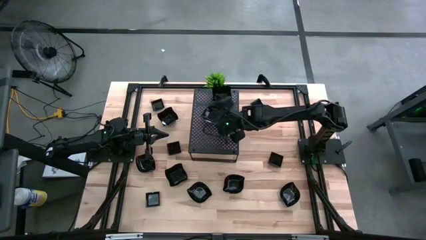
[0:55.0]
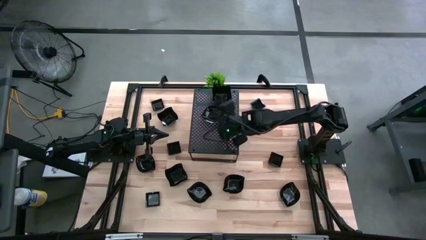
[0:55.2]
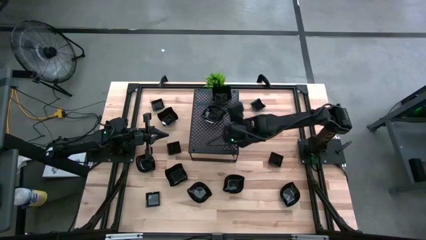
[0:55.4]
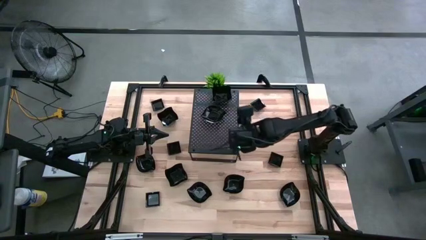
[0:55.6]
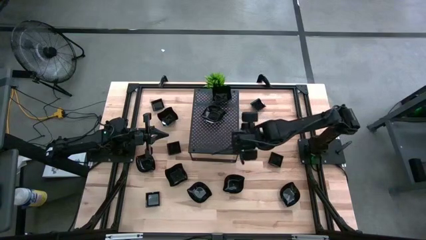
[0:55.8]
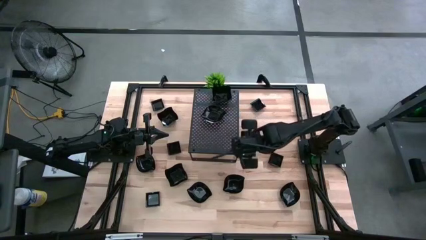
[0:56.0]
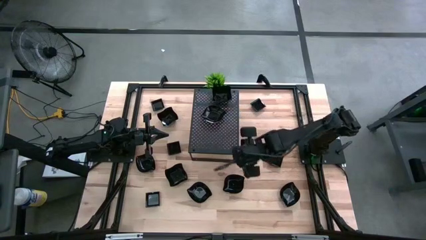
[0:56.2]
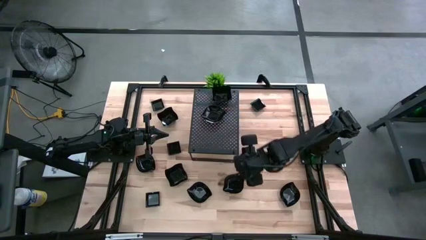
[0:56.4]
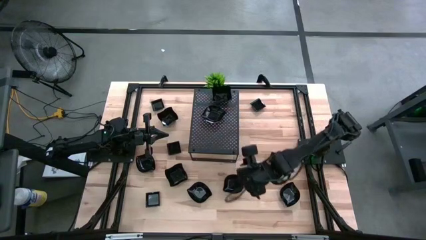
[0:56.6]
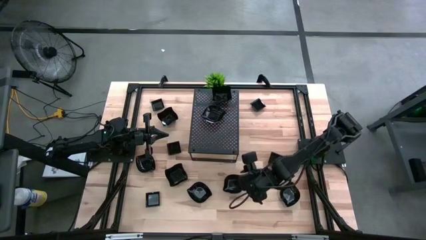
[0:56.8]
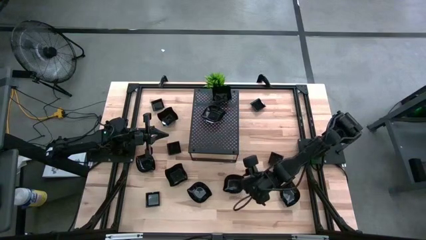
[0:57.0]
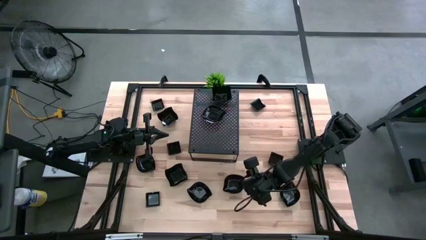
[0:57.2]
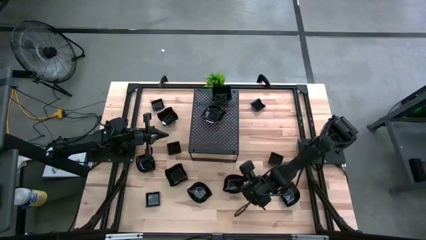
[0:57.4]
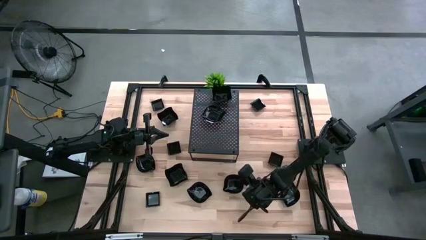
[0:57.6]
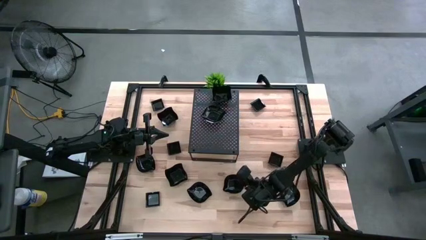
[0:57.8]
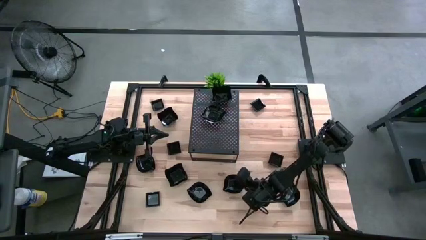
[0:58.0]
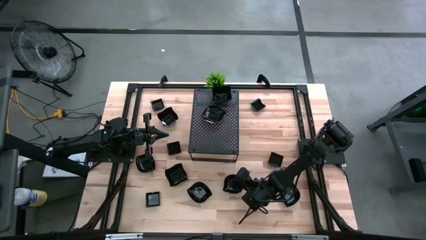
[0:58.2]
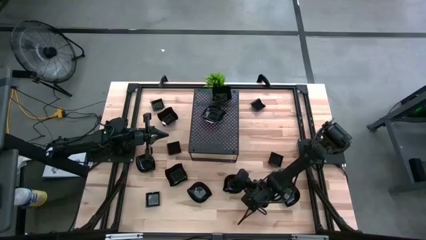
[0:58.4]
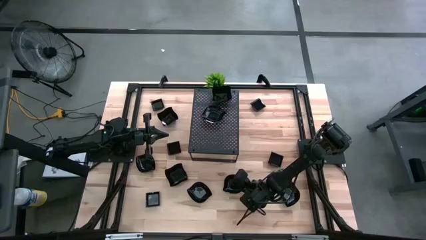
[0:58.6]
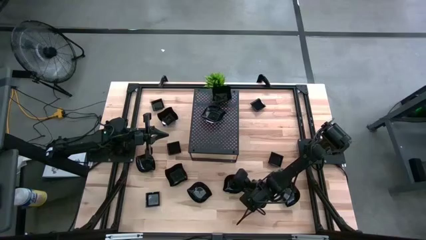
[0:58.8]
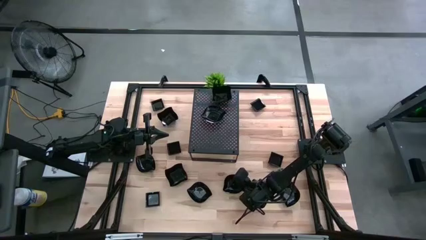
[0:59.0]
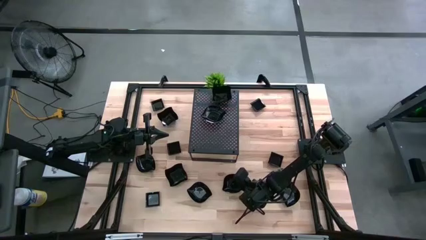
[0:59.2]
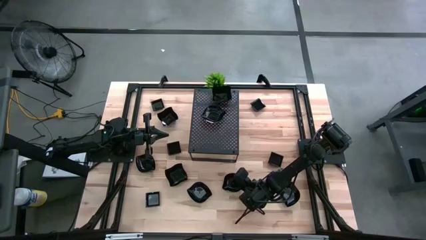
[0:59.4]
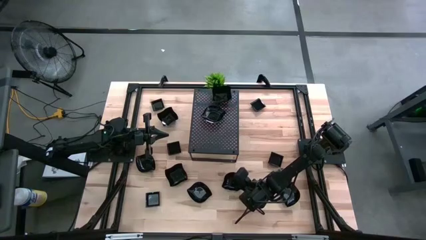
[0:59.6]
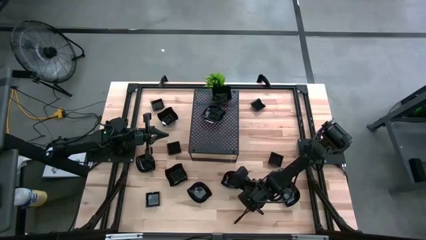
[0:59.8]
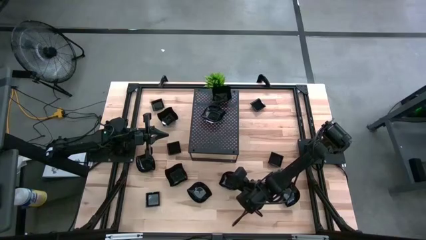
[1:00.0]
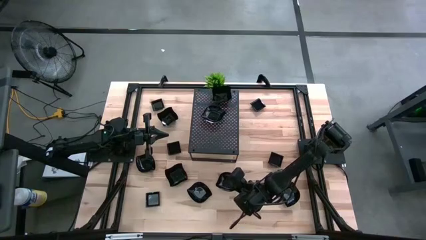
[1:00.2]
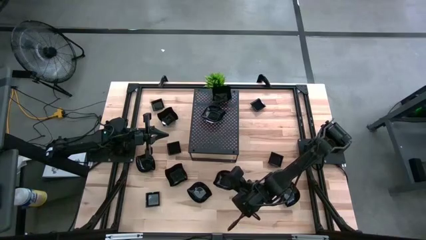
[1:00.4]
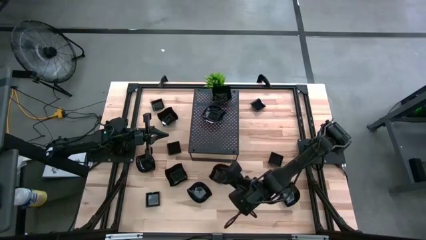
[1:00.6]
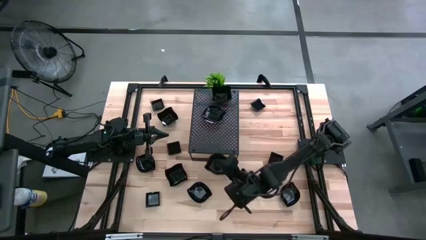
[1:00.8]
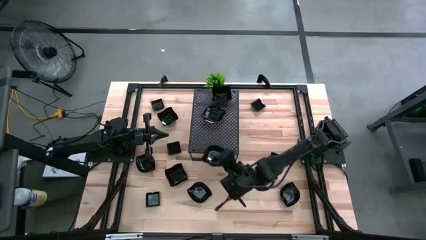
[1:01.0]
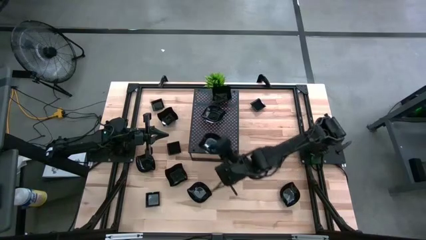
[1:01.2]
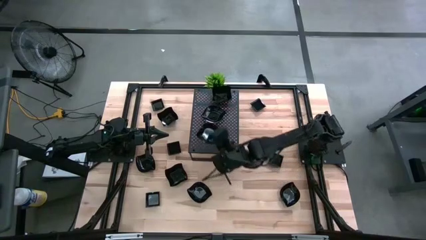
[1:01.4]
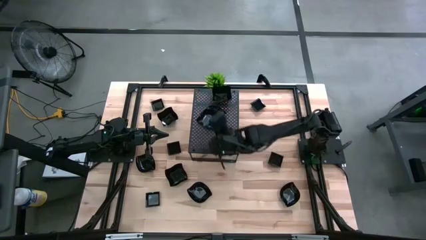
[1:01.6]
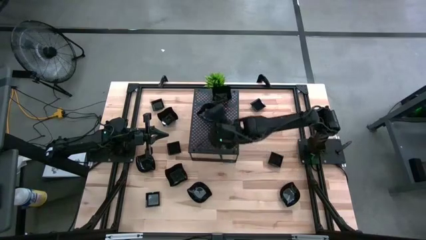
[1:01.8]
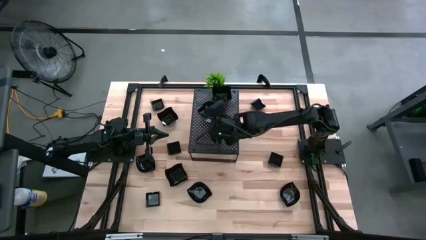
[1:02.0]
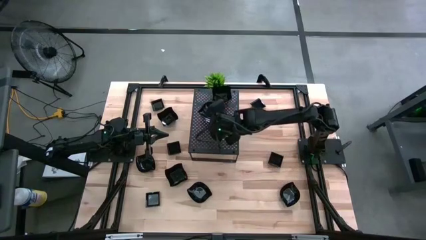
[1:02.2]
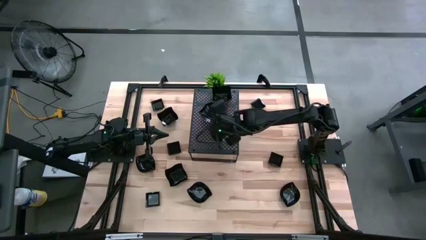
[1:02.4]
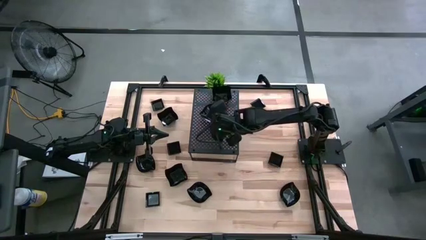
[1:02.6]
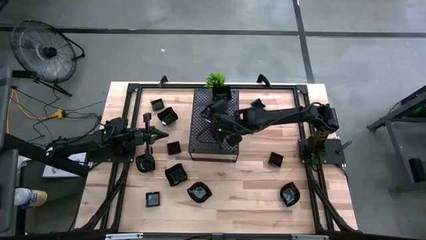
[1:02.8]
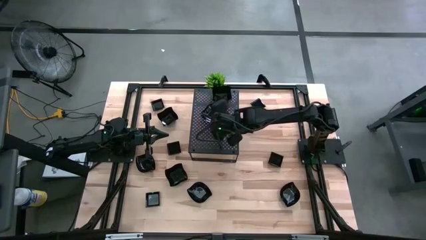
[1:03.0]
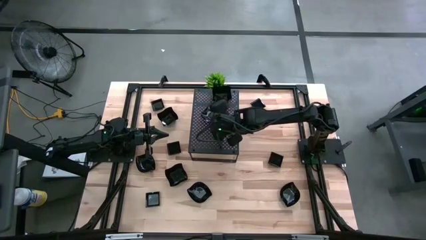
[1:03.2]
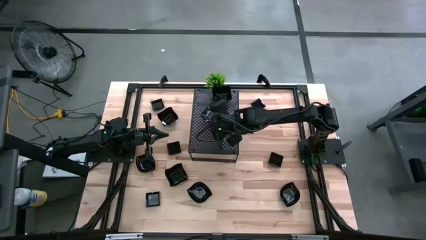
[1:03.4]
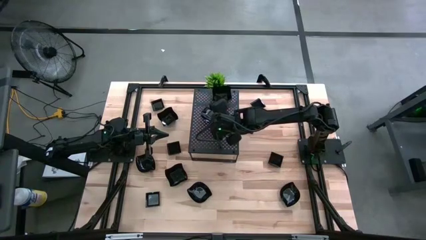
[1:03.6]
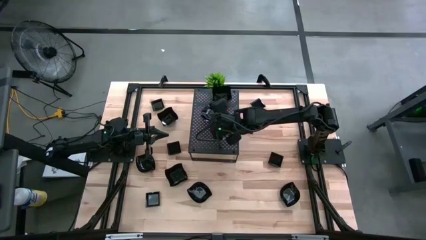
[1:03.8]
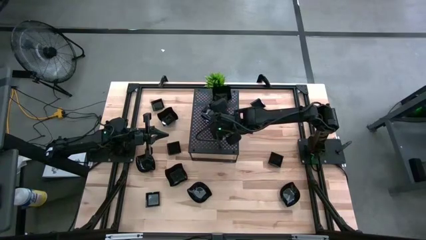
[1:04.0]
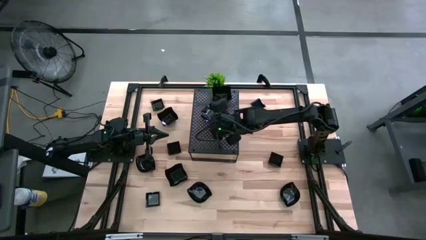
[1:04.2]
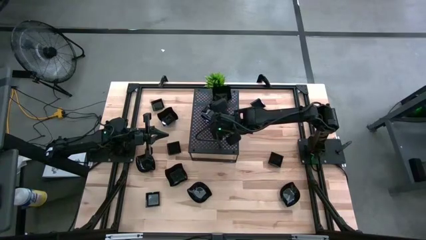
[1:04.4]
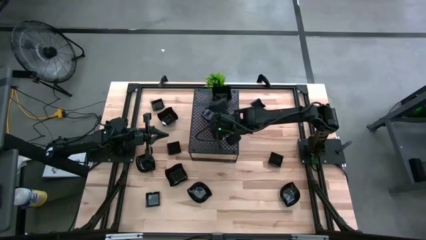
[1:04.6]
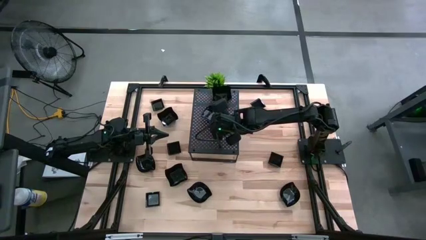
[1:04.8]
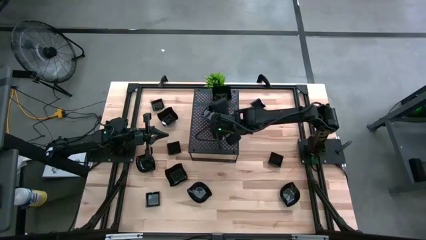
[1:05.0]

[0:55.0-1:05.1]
Task: Pick & Place Mini shaped plates
Stack the leaf shaped plate on top of the leaf shaped plate on the shelf

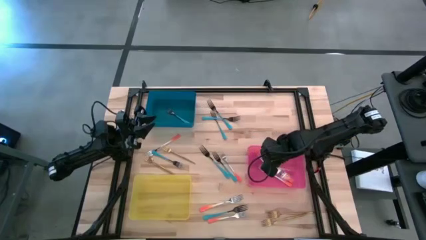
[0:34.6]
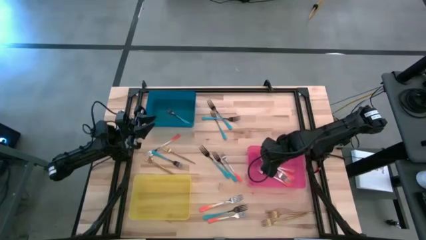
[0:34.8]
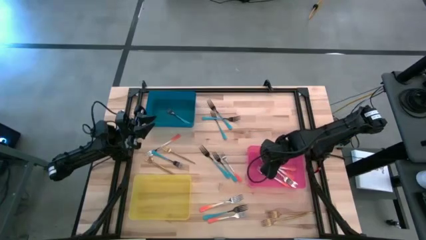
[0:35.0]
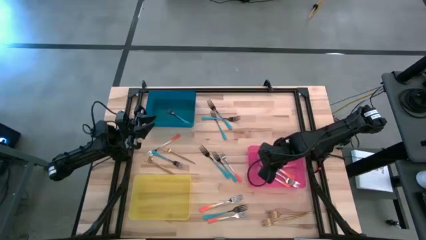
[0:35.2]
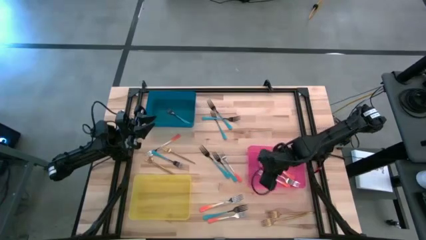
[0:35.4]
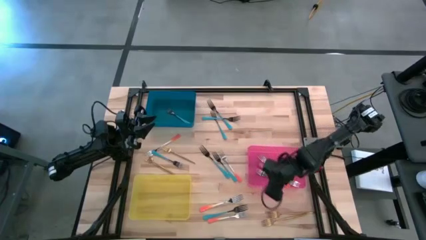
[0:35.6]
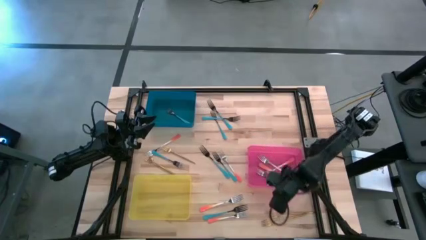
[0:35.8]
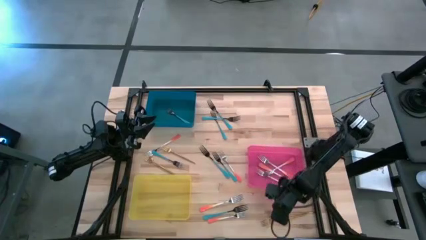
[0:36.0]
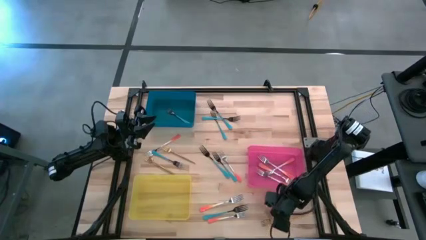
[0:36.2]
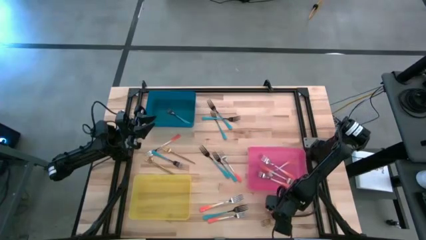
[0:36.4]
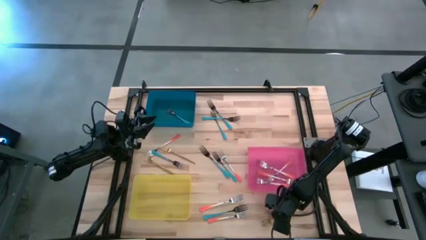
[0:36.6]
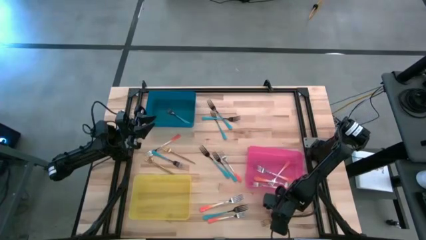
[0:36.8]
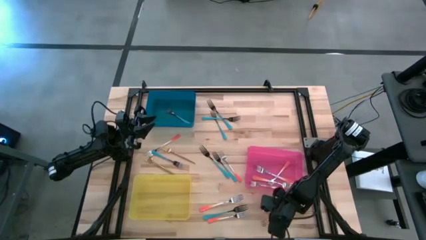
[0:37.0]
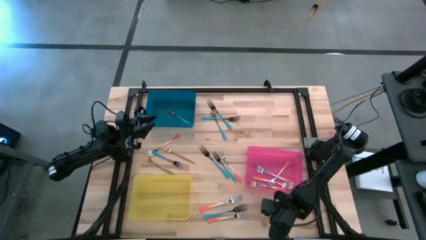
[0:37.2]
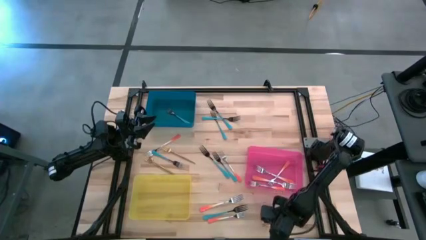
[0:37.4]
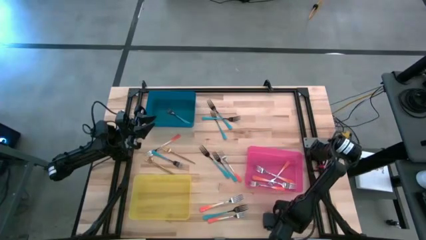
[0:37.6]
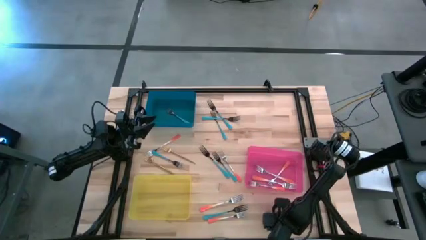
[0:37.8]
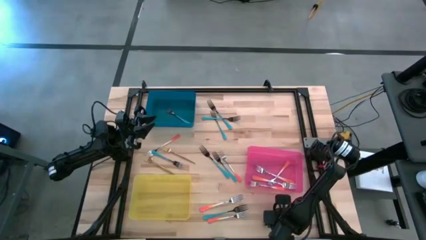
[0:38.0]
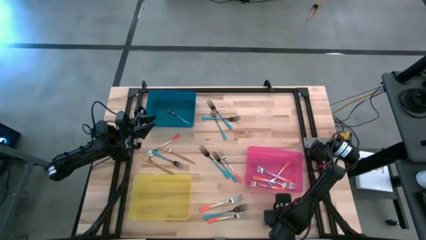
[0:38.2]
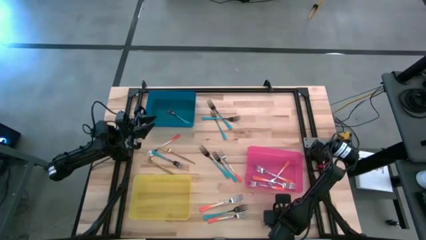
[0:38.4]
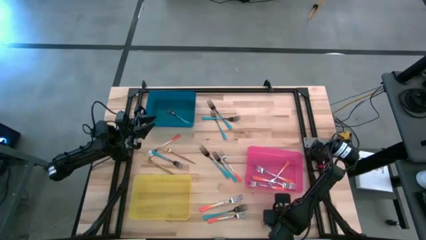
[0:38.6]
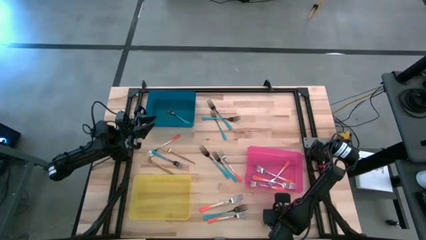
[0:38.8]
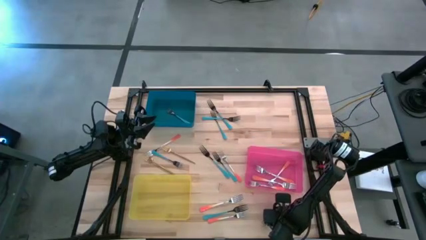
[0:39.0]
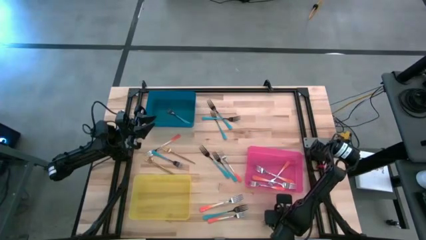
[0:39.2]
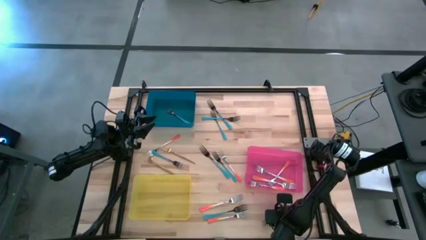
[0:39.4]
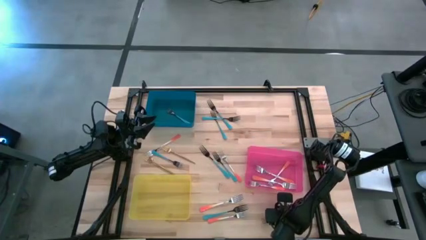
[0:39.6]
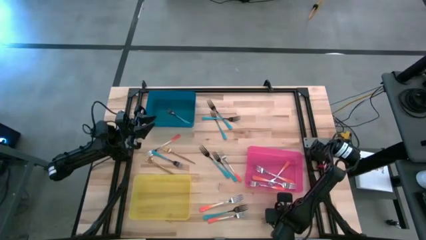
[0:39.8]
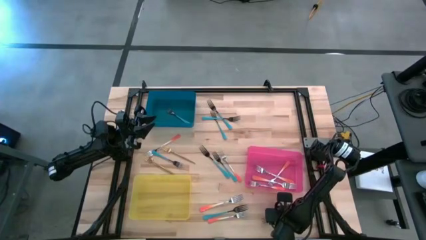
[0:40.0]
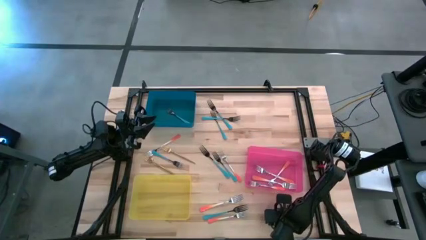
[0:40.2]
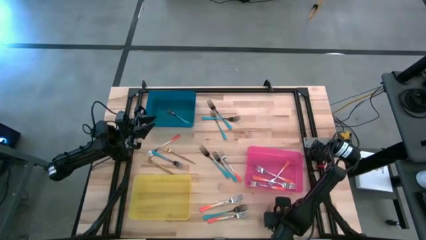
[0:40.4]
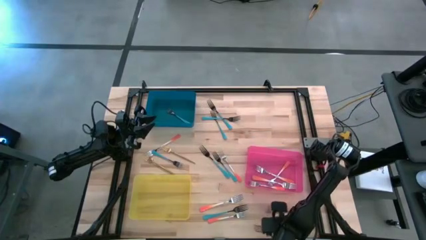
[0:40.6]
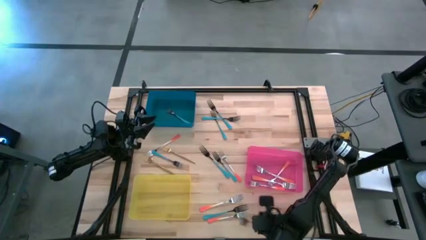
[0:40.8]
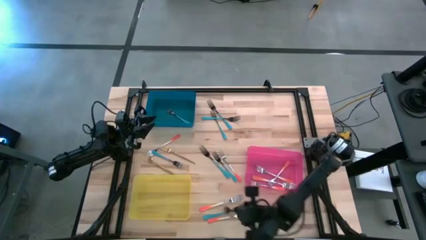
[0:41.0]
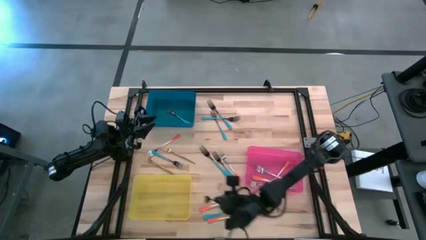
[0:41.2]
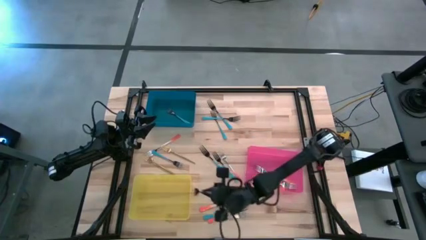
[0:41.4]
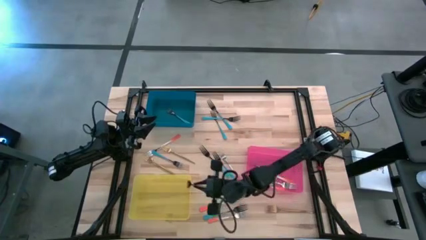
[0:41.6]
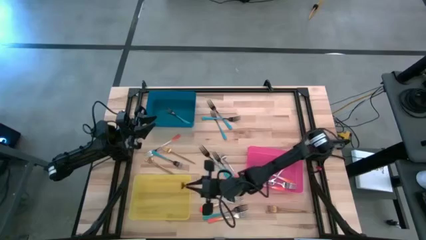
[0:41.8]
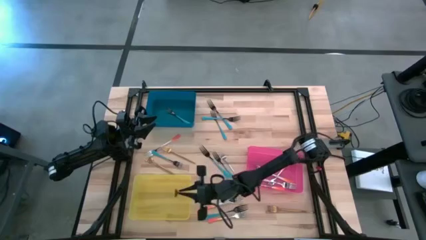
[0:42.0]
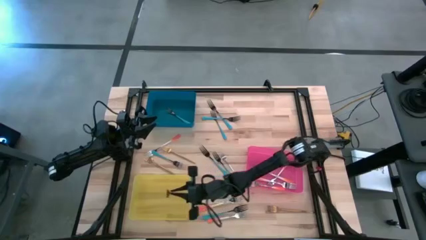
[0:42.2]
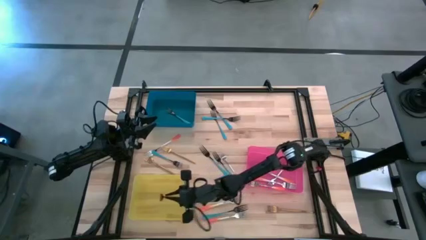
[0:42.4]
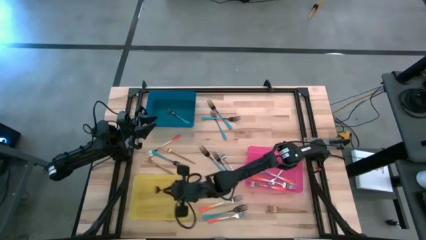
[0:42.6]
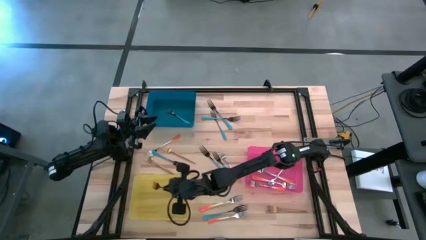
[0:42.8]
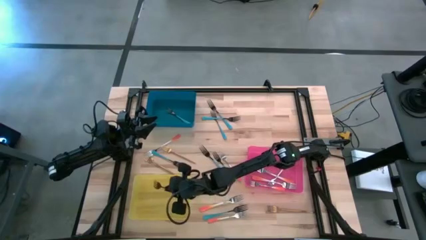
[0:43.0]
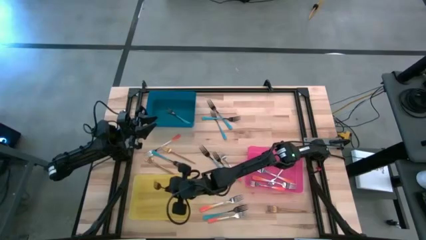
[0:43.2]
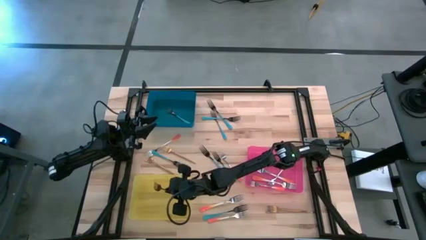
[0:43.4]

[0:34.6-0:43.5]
Task: Sort silverware by color (type)
Put the gold fork into the yellow bin
